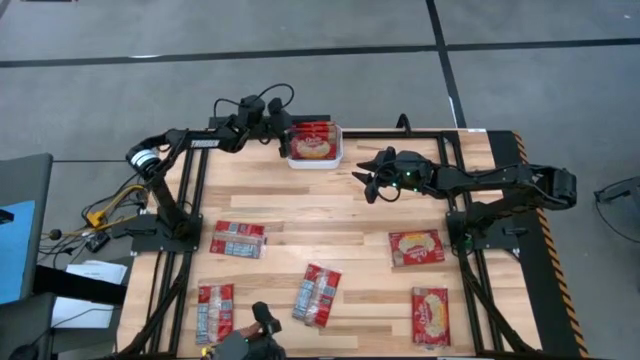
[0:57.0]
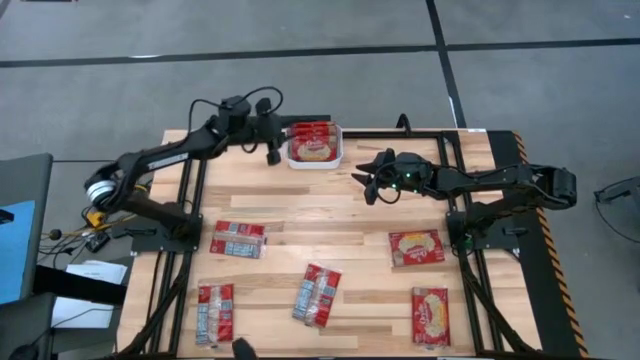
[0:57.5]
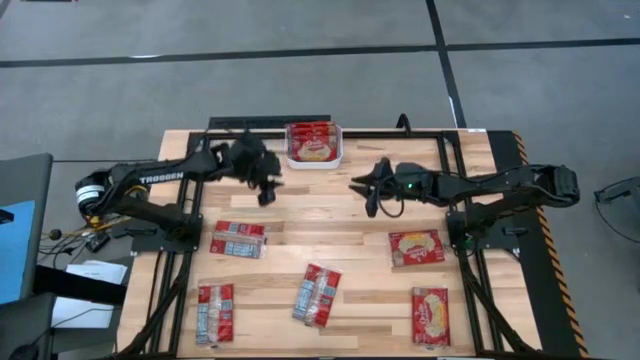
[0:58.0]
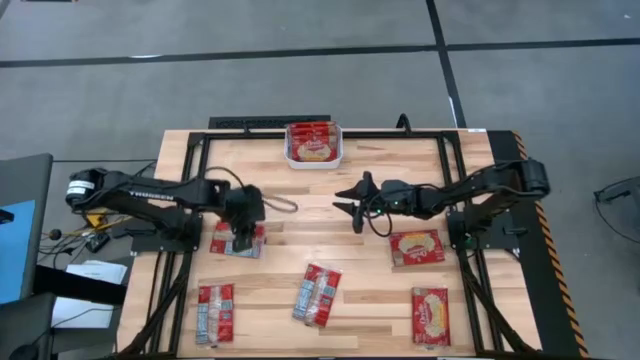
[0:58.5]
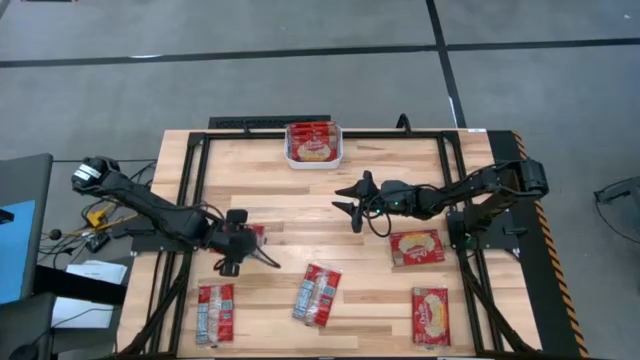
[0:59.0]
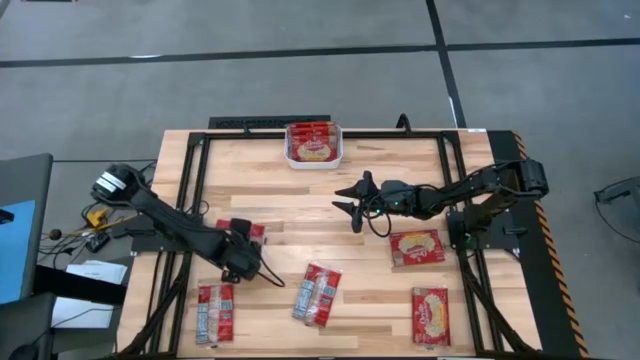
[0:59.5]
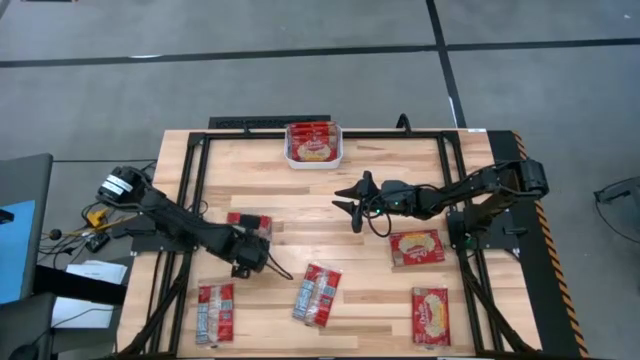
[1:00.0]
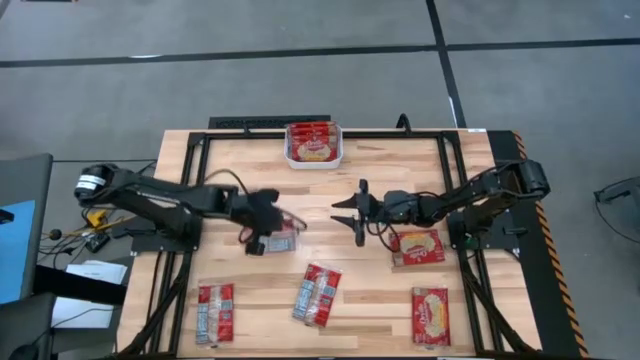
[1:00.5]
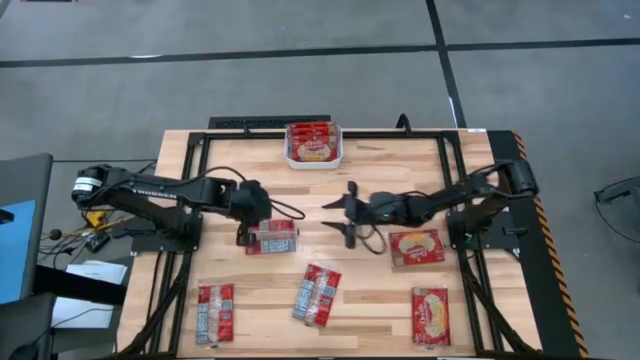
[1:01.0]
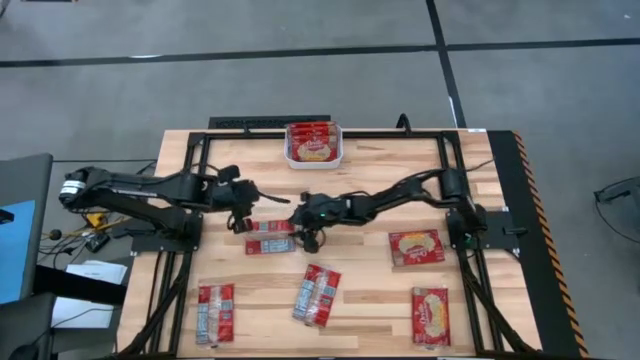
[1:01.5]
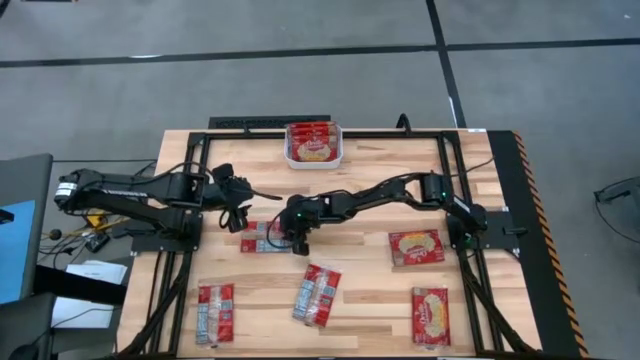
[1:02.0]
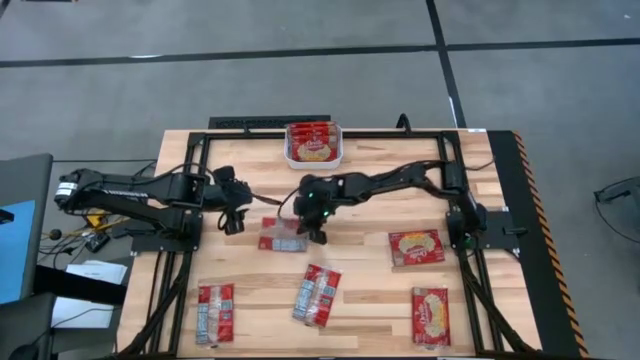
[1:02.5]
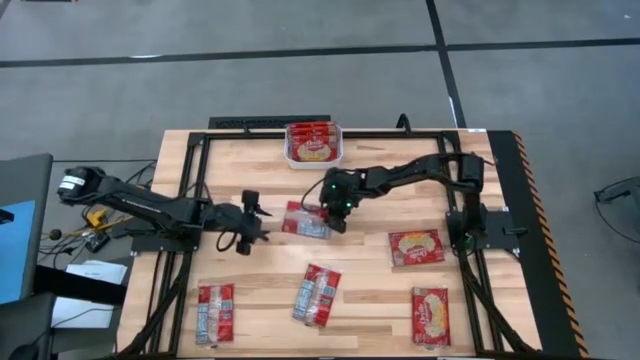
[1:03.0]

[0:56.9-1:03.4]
Task: Sort popcorn bags into baskets
Put the red popcorn bag into the white bin

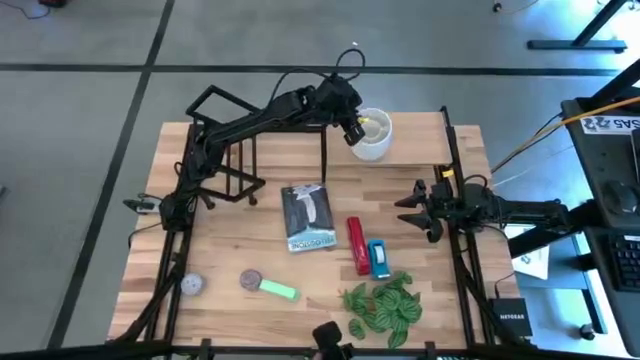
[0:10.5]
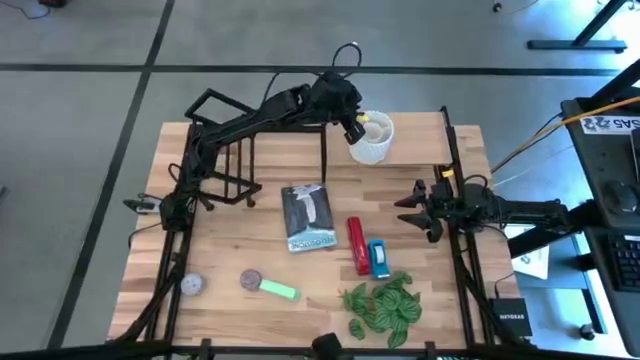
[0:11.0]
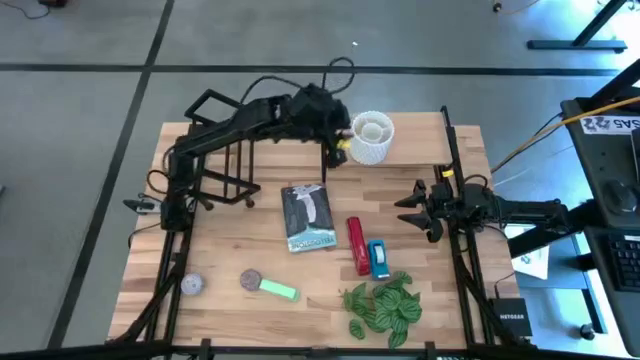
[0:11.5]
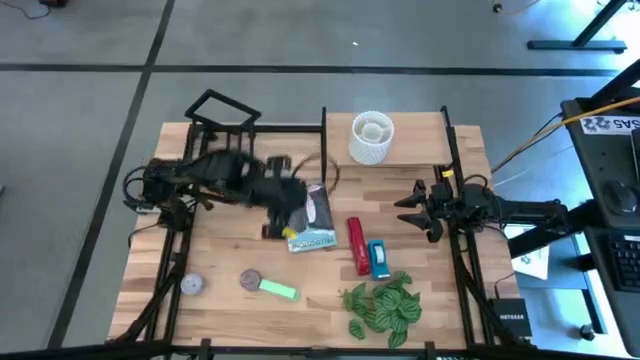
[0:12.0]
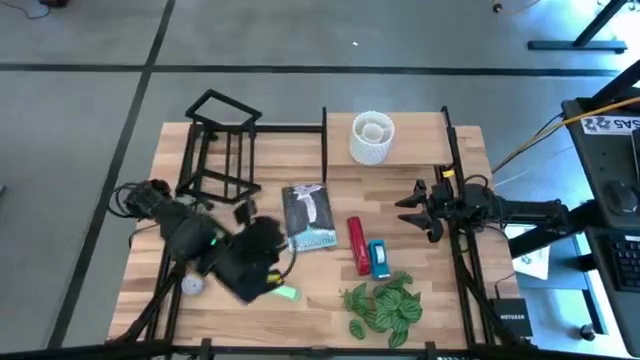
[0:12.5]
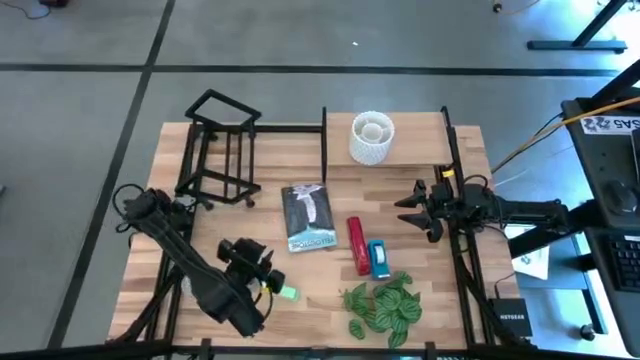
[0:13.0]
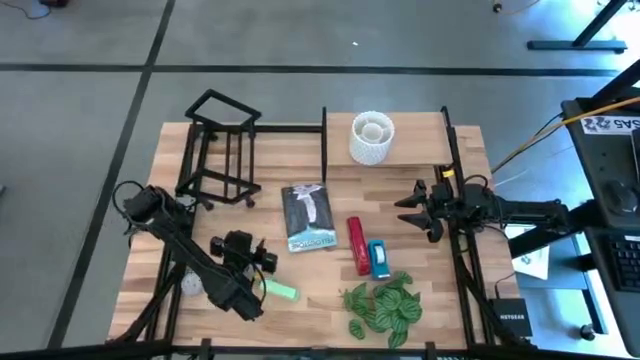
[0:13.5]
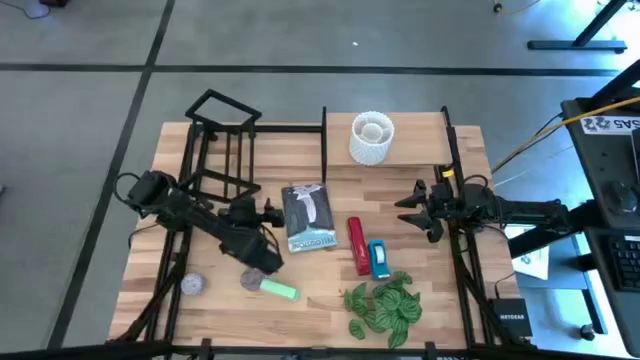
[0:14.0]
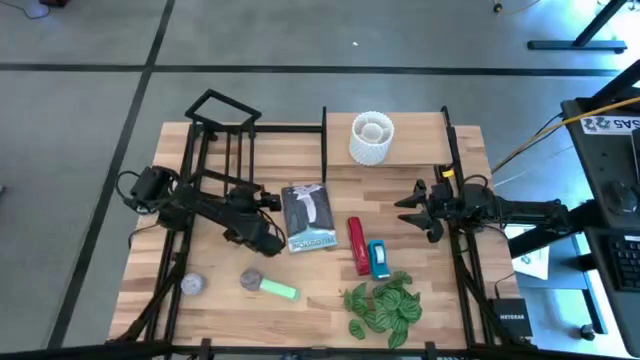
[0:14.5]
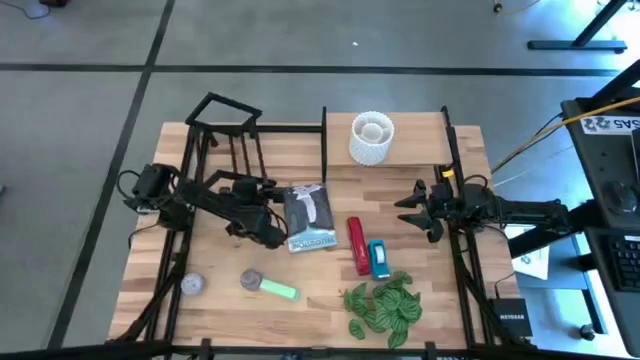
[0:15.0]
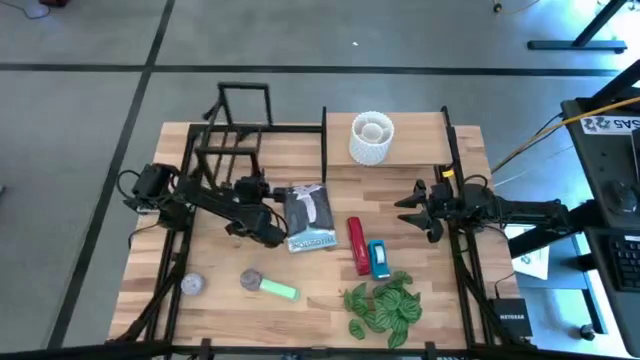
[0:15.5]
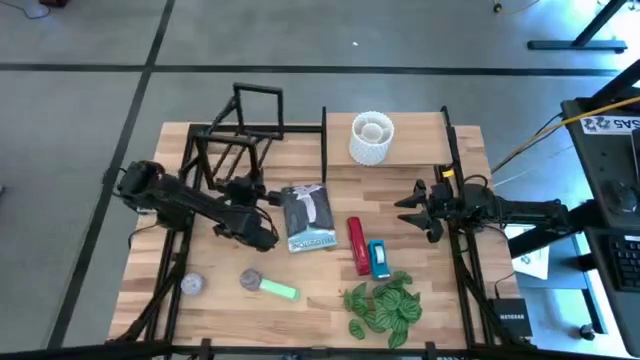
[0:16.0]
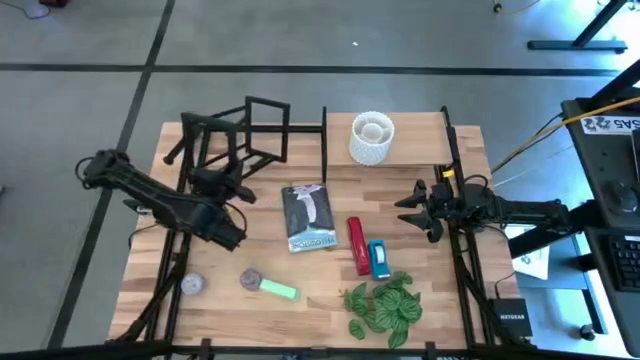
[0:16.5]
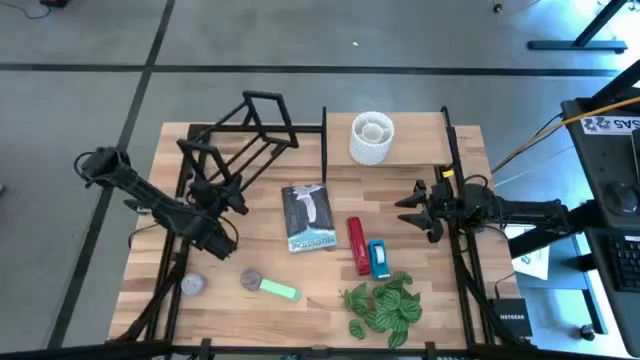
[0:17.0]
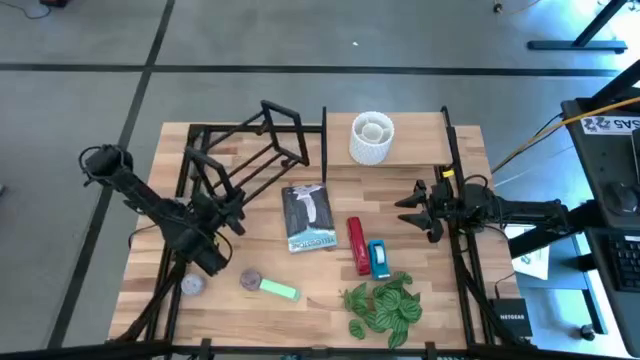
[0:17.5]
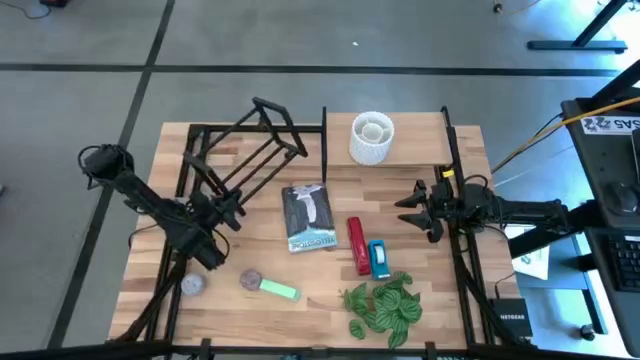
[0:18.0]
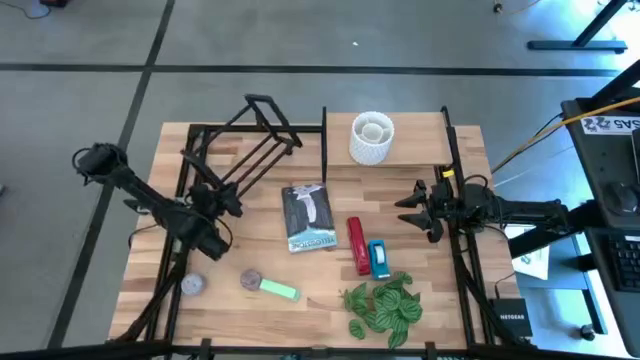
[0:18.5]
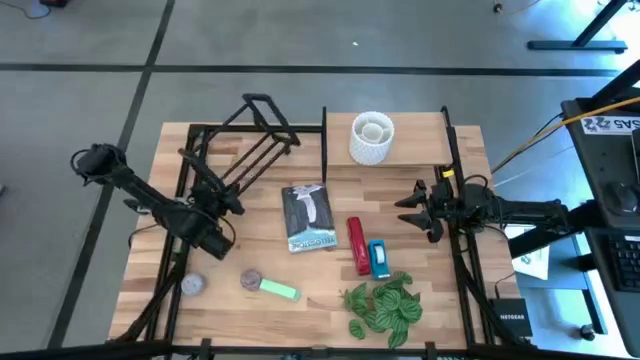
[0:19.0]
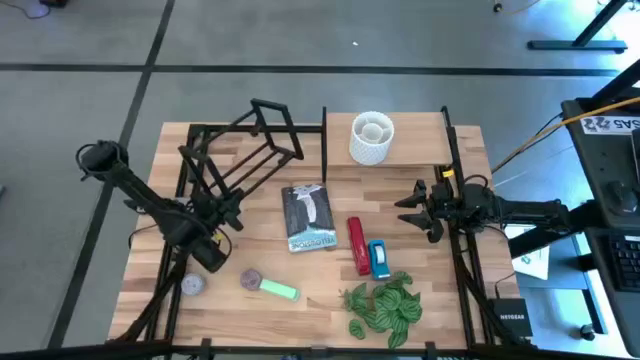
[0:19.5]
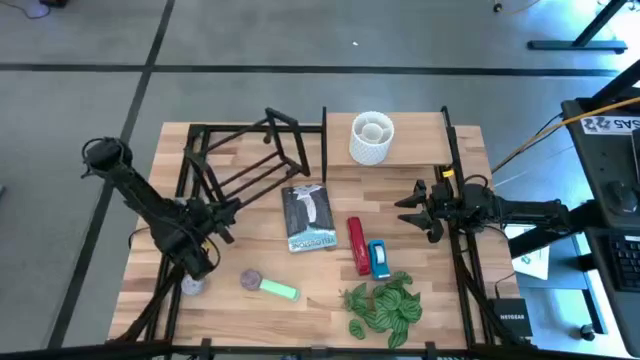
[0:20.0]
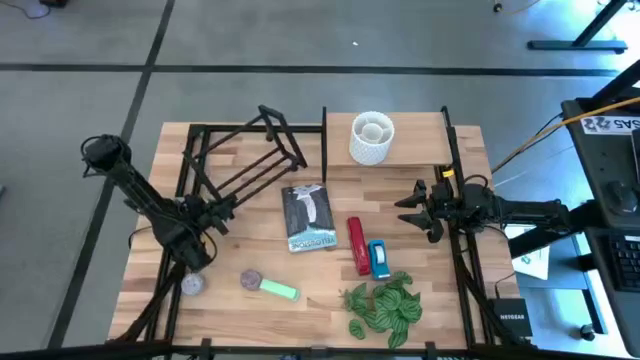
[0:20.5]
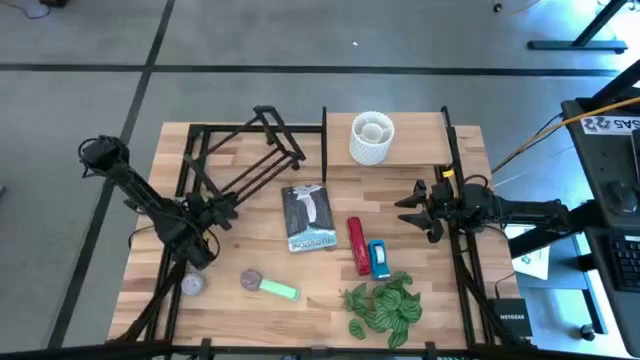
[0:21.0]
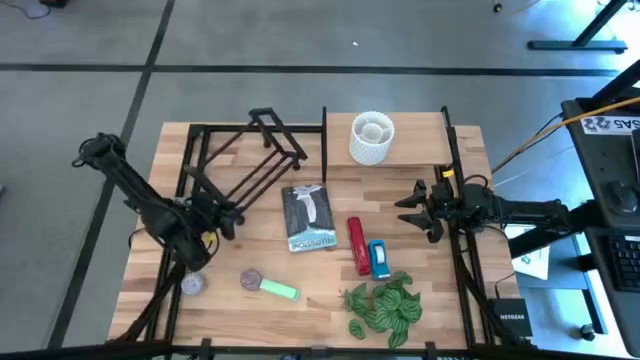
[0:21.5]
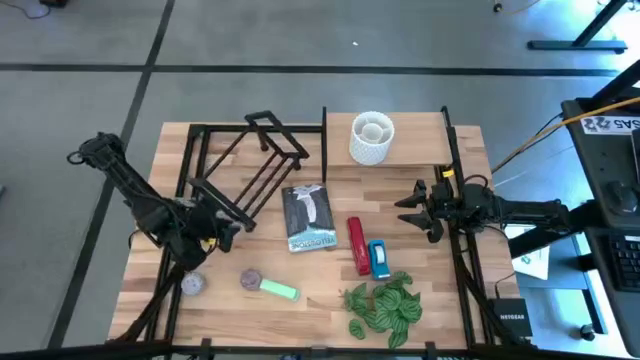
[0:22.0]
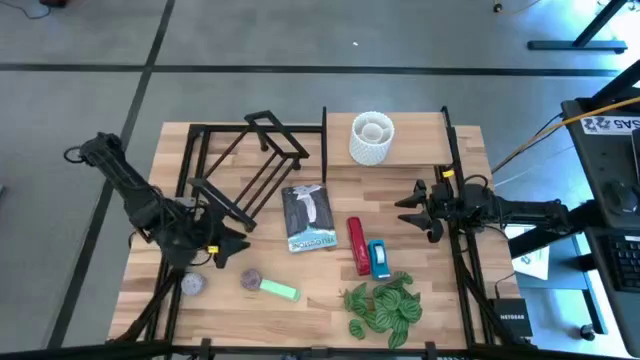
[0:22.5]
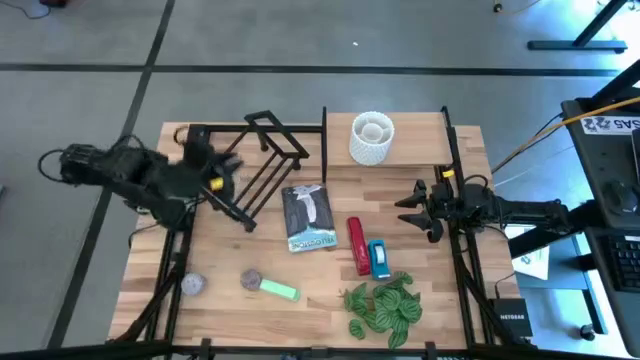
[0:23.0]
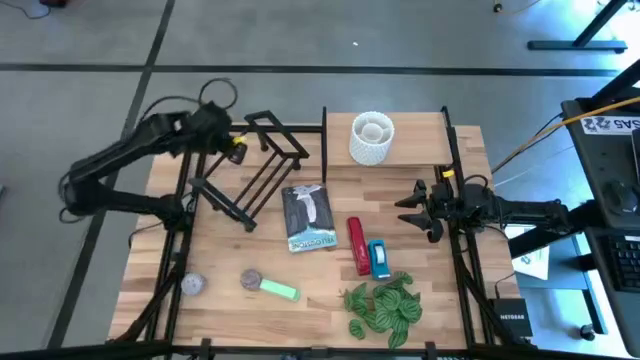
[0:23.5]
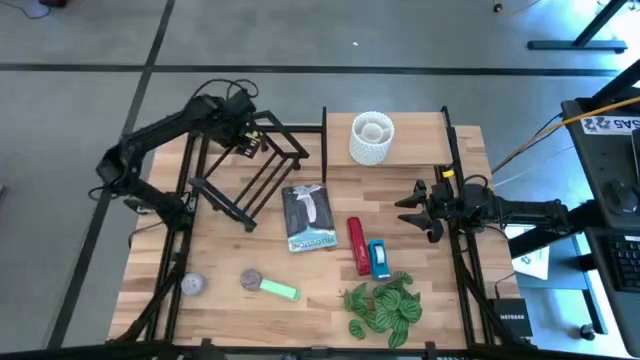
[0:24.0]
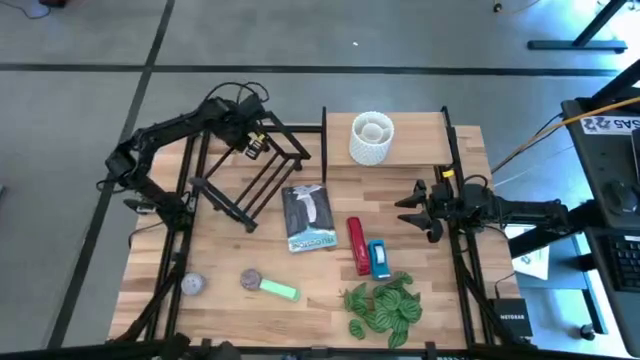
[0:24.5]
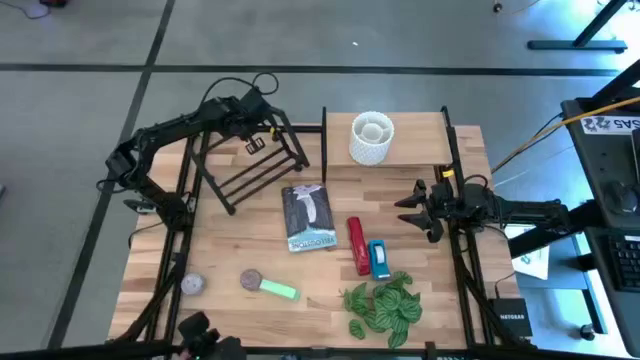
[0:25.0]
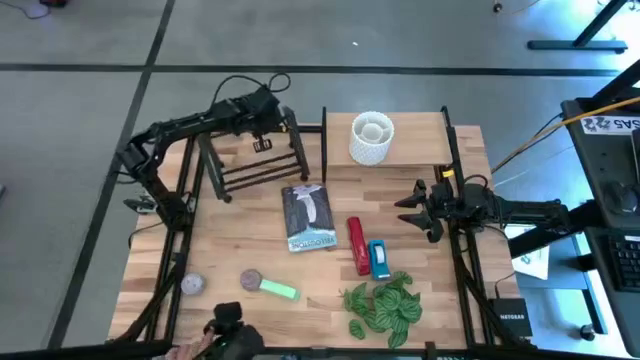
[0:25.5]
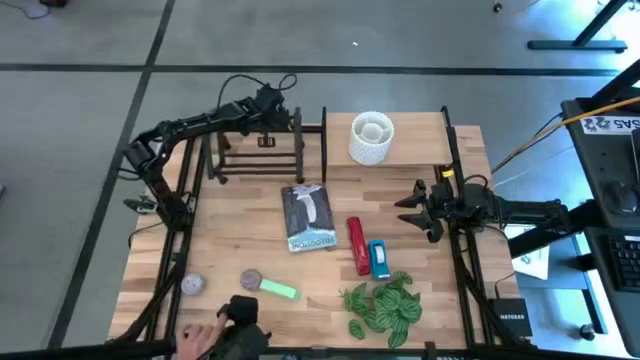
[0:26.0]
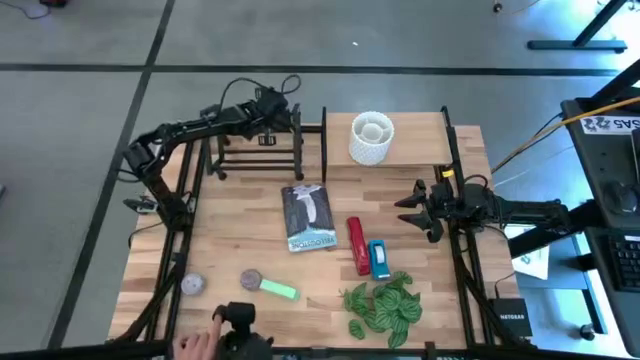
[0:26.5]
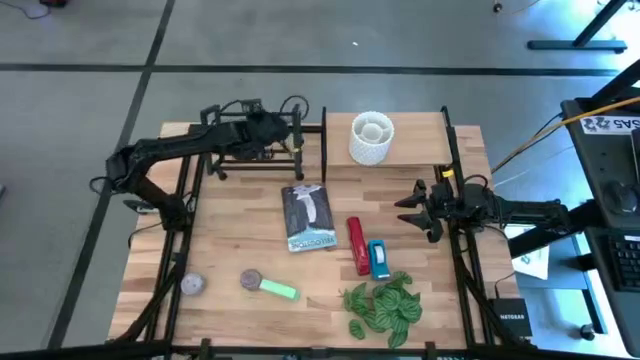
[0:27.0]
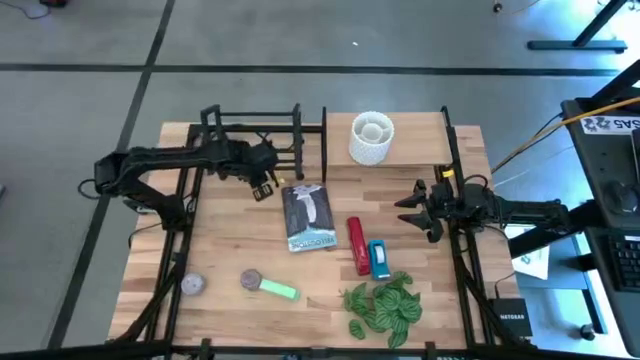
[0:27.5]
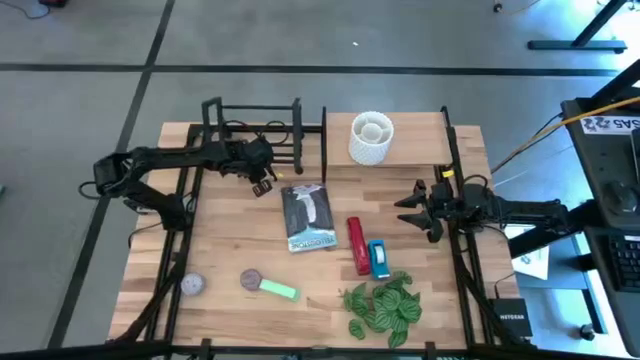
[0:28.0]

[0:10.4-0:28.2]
Task: Stock shelves
Adjust the black bookshelf
